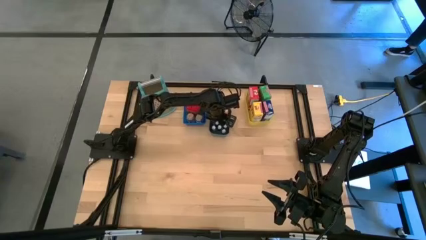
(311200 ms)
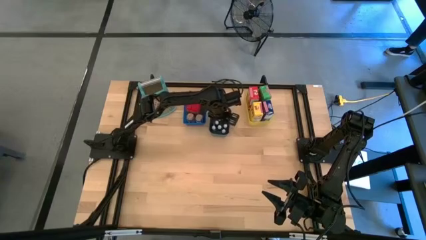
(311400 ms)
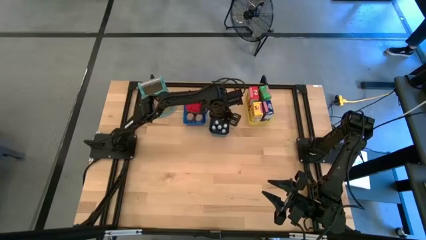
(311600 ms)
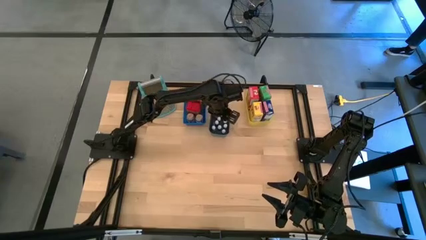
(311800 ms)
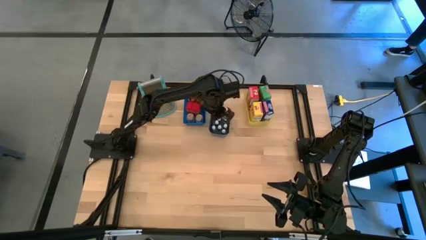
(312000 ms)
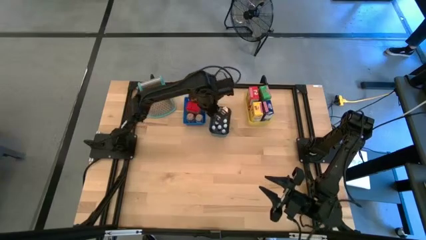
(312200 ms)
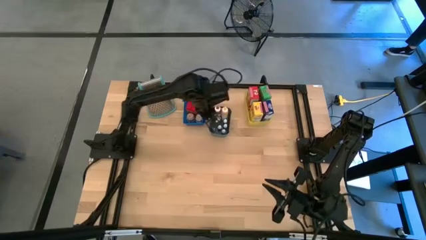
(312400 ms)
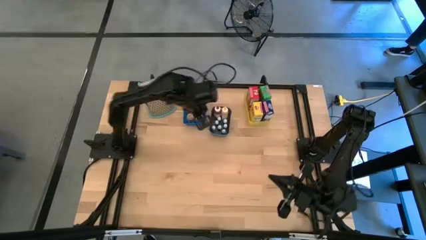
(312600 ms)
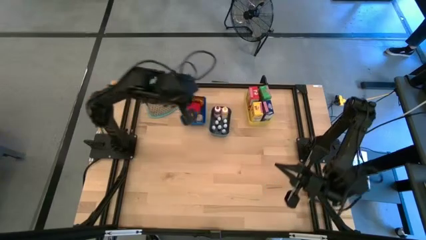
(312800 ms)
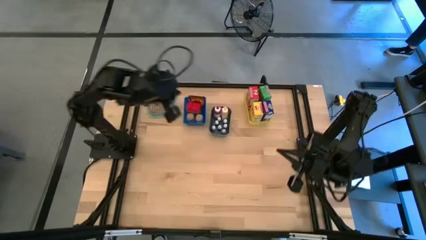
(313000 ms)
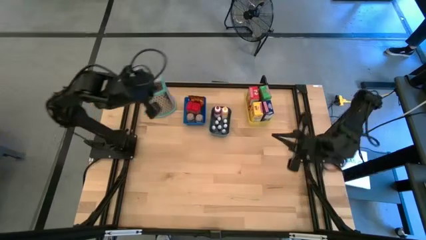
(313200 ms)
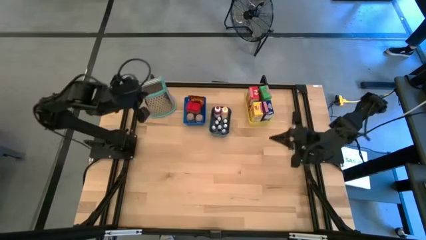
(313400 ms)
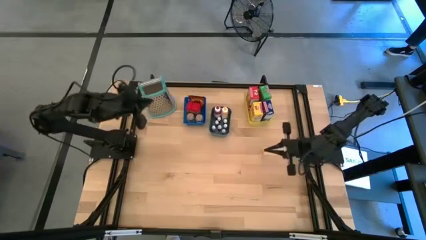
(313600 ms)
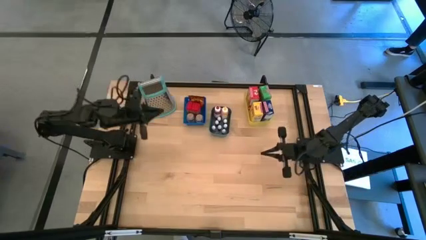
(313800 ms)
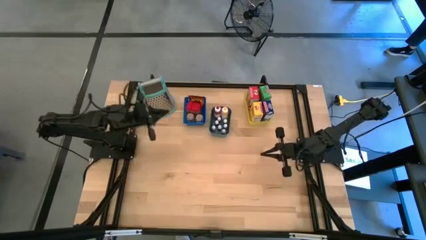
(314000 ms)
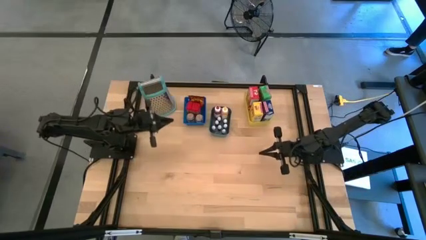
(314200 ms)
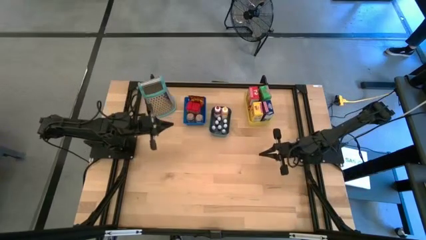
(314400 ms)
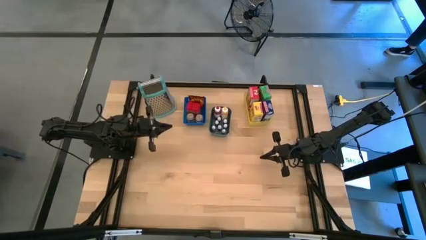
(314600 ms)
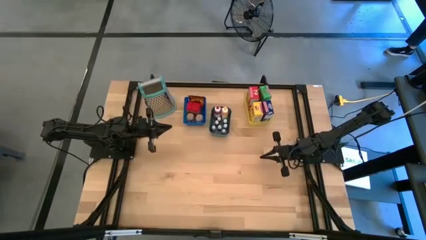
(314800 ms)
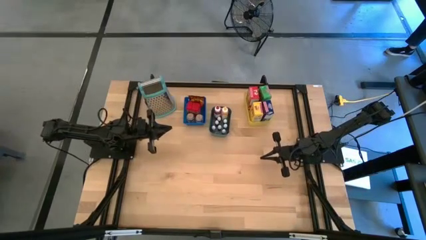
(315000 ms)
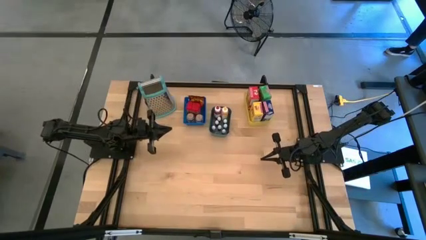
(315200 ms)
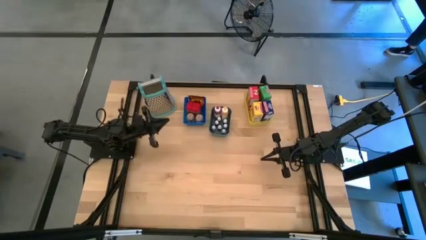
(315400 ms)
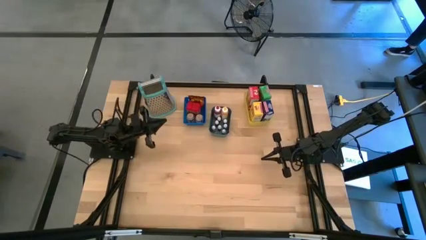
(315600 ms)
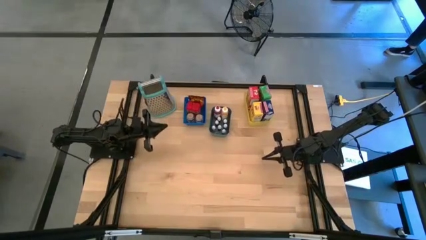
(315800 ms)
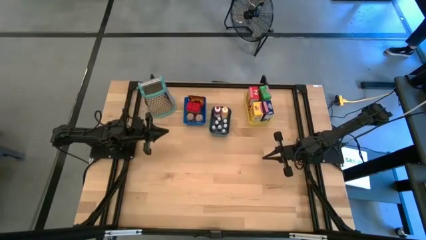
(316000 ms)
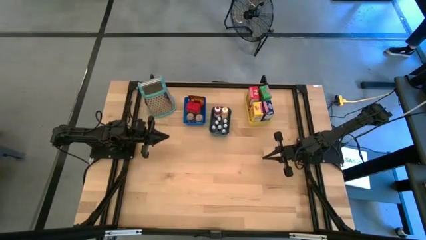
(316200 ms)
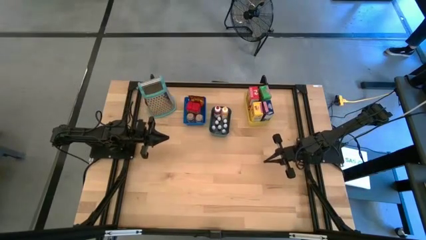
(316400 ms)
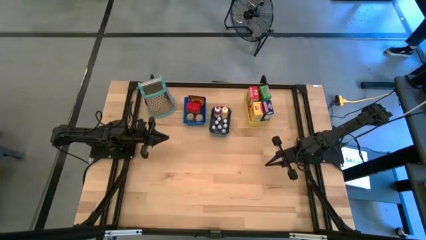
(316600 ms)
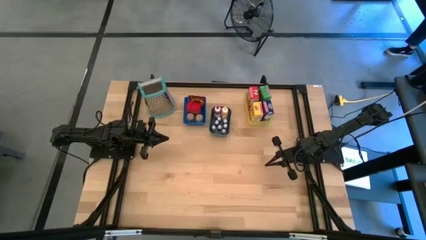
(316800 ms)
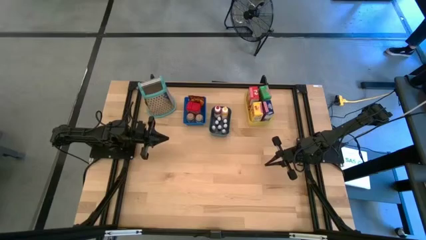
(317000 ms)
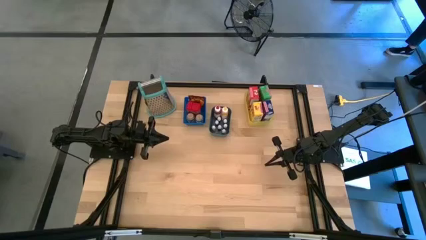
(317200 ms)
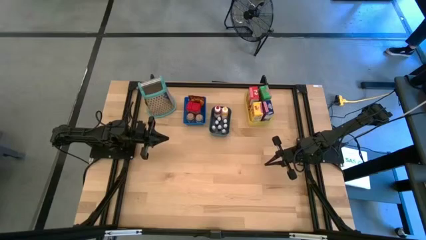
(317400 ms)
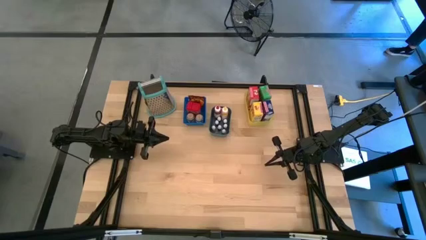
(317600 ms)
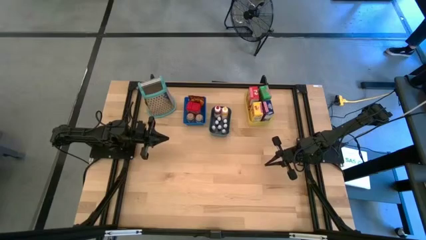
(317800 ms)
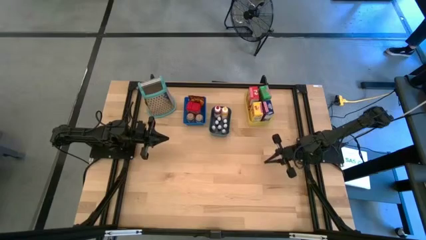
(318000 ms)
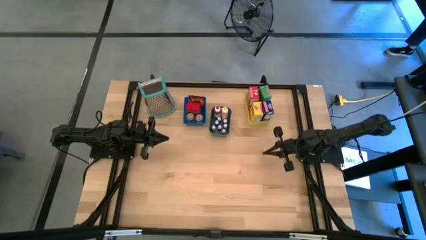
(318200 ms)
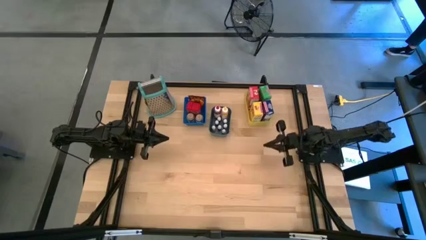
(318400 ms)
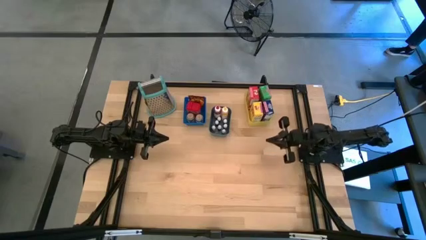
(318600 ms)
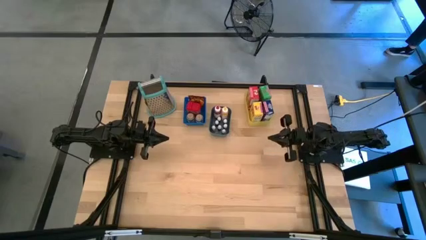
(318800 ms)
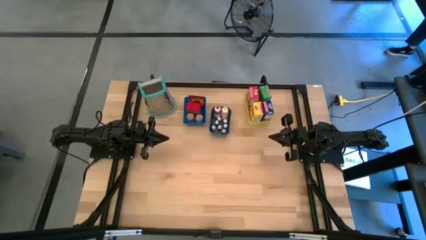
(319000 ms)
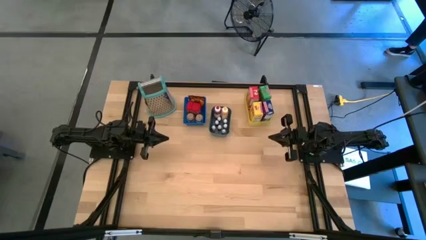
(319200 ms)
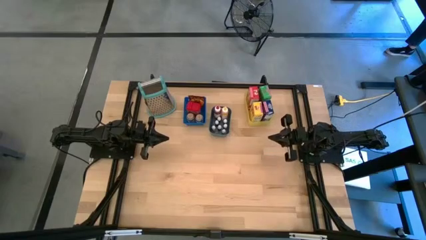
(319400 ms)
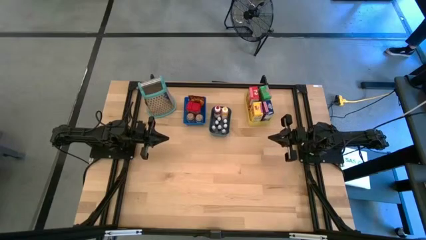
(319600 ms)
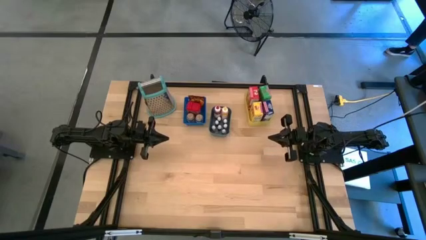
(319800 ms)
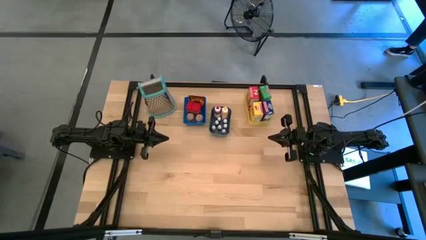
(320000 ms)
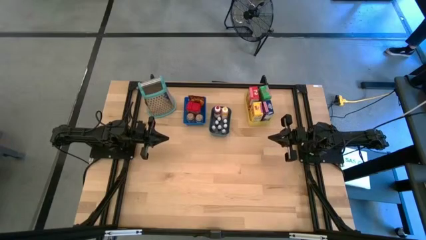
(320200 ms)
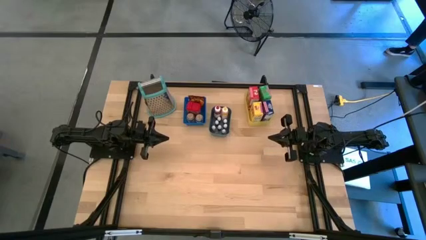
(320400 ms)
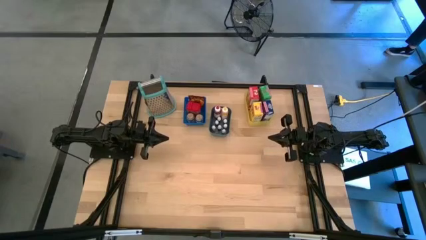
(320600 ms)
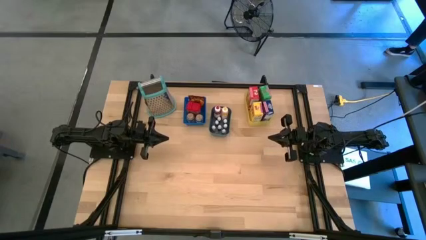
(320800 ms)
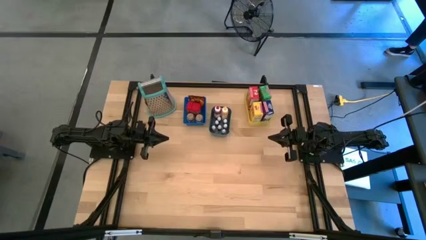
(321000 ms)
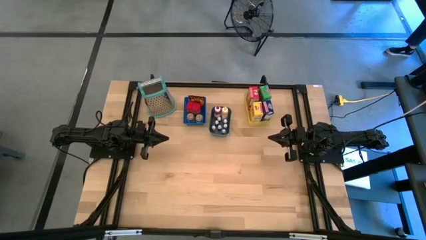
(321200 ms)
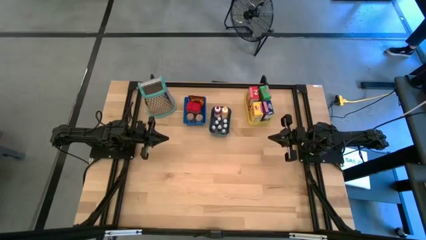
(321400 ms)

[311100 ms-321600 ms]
Task: Pick & Place Kitchen Items
Return to Home Position

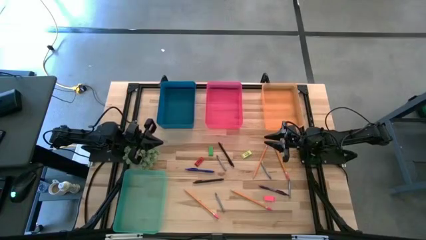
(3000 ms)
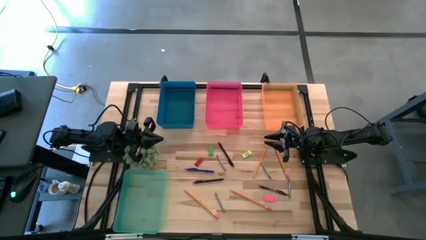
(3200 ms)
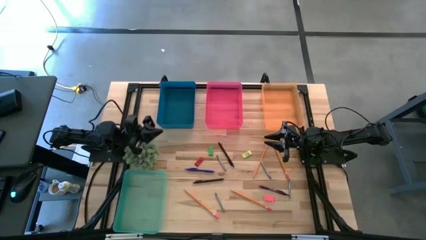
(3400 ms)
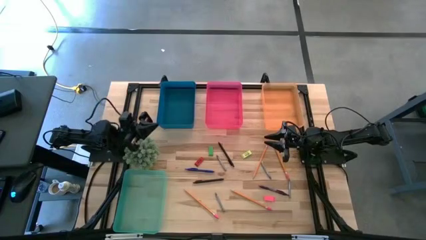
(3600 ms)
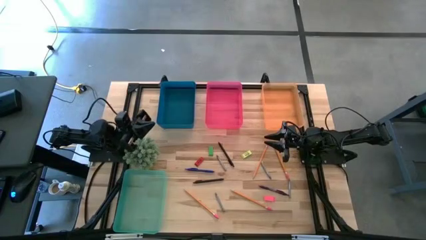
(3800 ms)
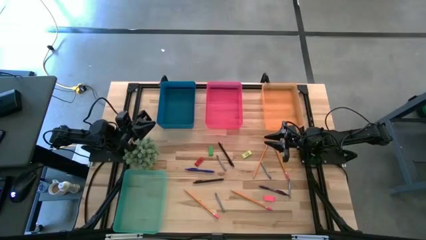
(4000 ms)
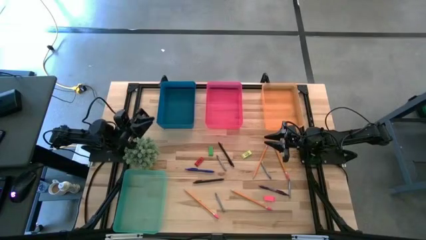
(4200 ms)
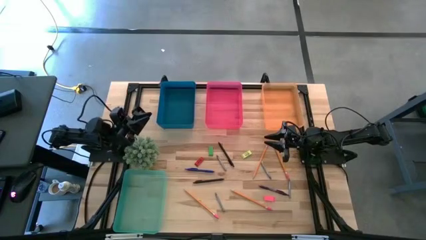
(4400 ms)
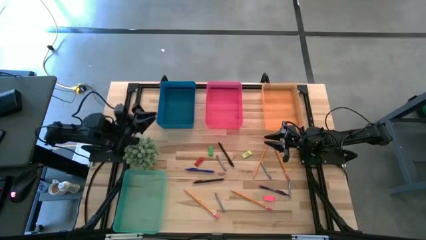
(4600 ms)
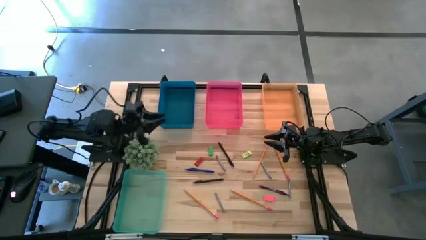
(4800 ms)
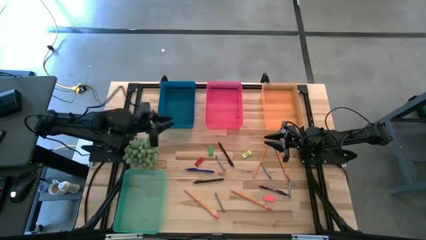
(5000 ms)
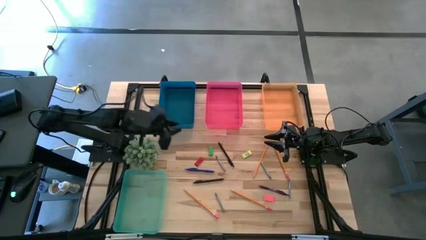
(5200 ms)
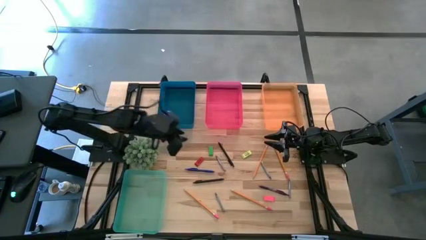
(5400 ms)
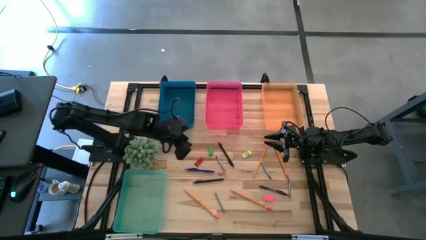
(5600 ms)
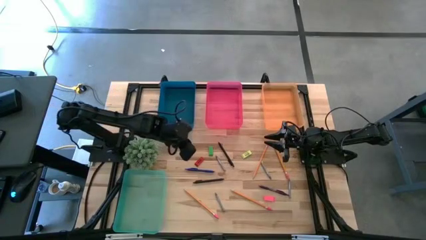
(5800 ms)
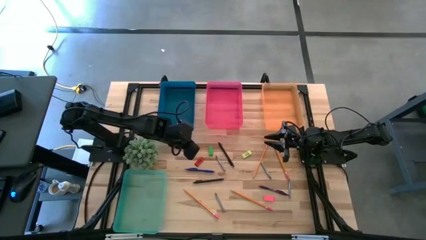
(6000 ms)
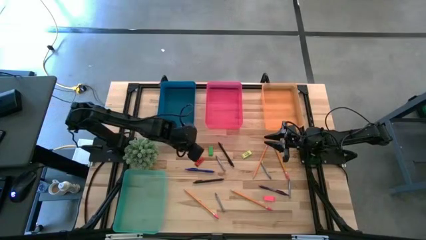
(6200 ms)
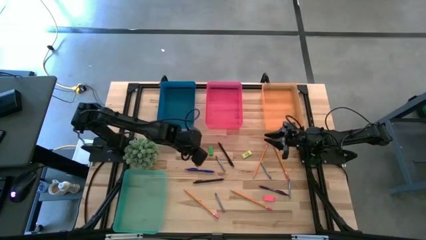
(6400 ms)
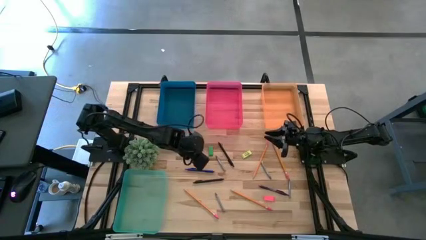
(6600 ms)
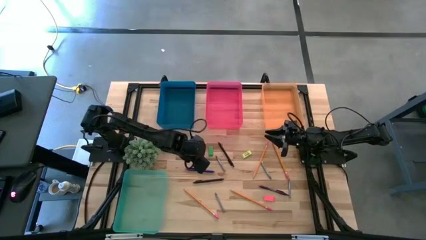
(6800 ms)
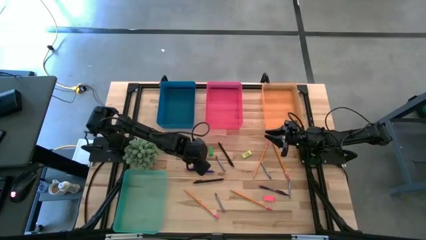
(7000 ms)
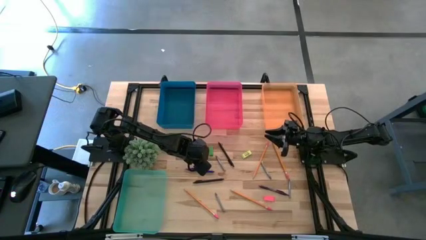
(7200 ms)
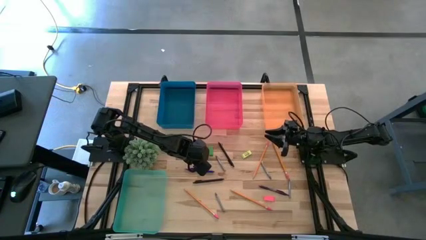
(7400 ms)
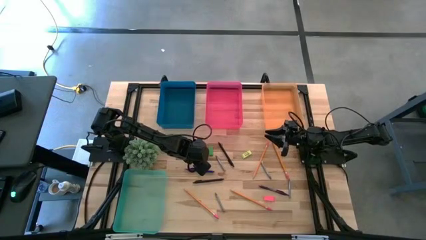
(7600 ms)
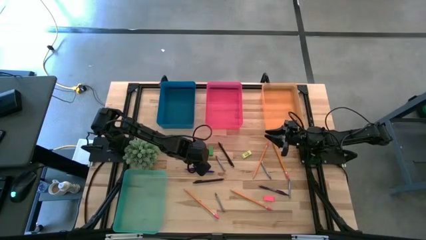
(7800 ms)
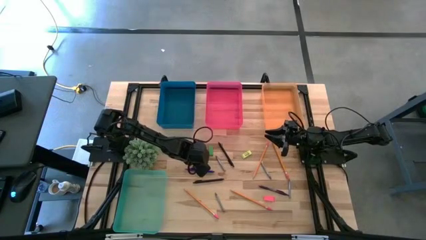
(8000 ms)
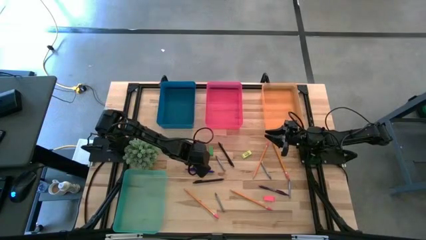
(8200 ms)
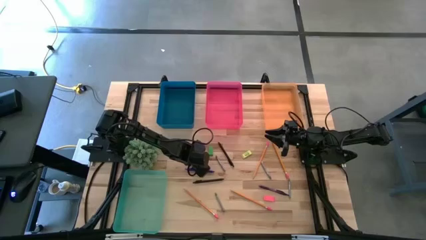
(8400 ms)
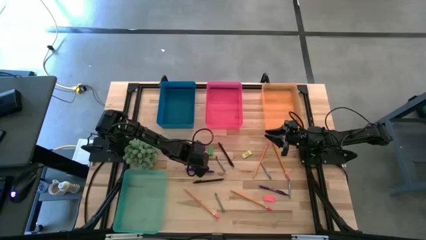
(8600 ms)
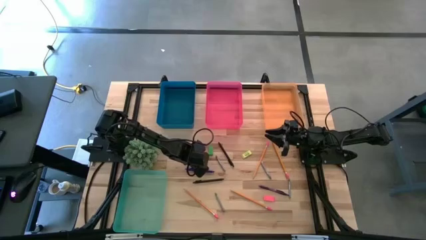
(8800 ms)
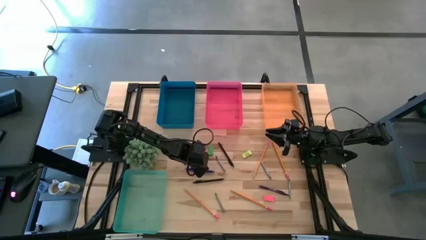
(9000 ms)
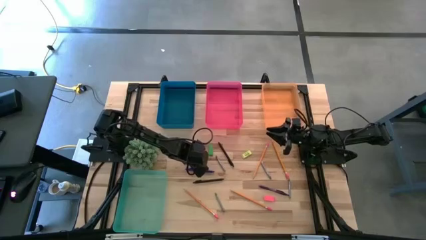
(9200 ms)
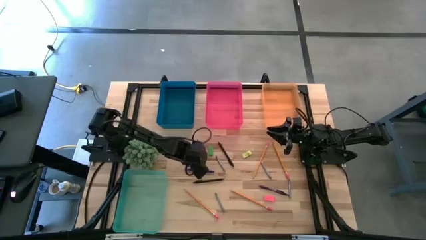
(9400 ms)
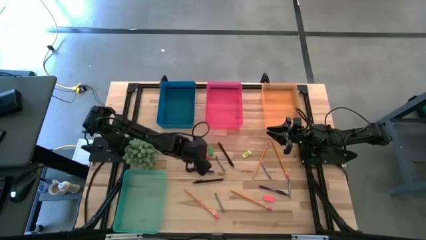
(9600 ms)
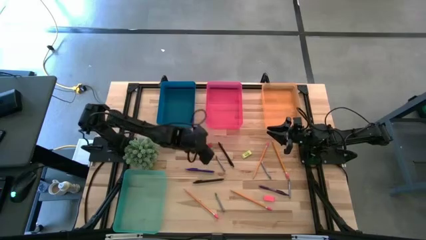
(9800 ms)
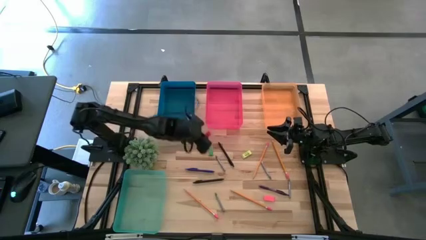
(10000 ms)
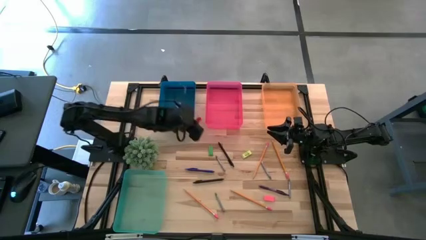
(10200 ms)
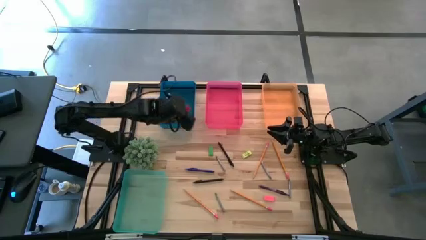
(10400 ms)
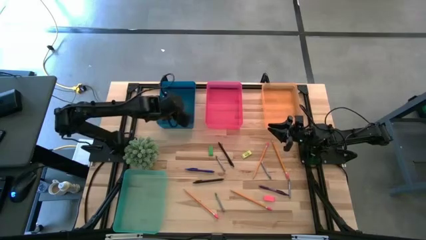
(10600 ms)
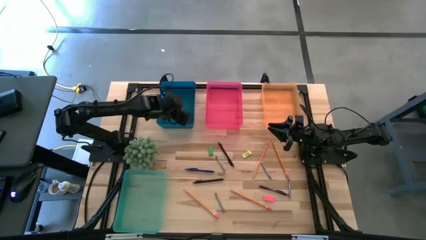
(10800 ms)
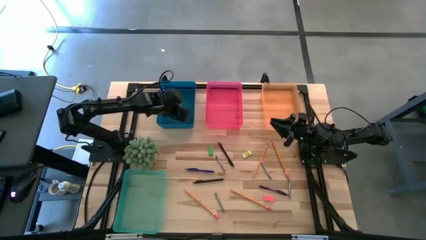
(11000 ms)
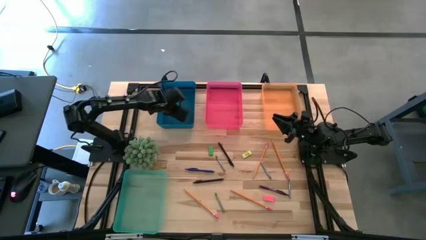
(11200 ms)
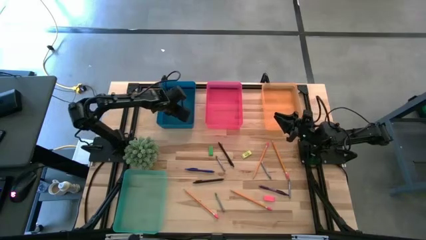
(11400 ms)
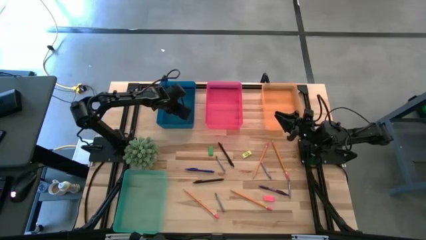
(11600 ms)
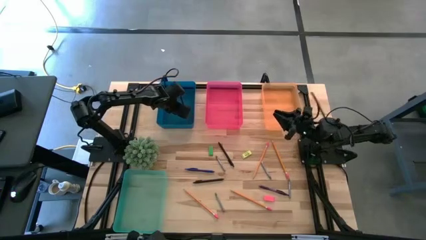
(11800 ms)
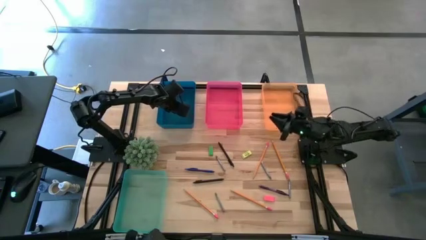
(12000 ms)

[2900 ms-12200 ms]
Task: Sort crayons/erasers/pens/pencils in bins
Put the red eraser into the transparent blue bin
